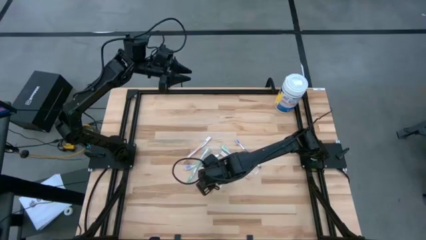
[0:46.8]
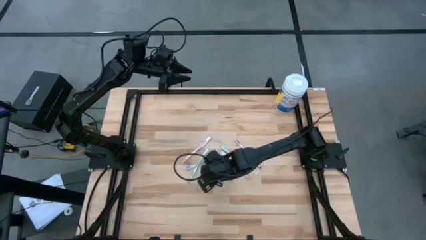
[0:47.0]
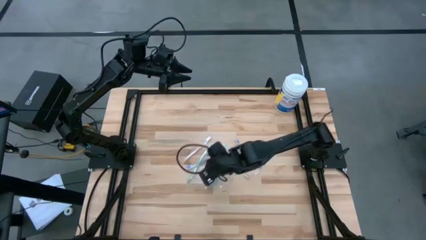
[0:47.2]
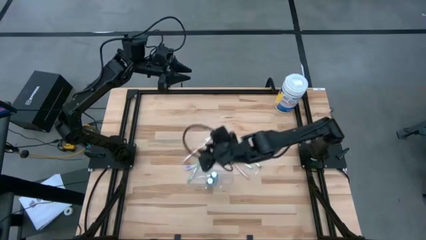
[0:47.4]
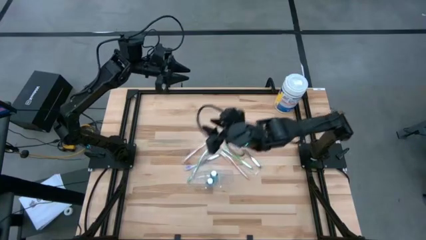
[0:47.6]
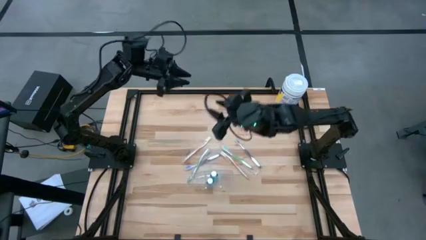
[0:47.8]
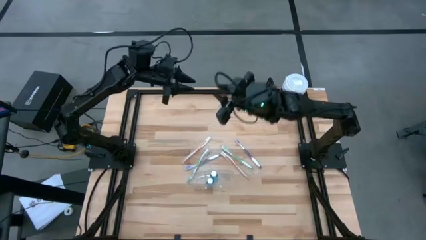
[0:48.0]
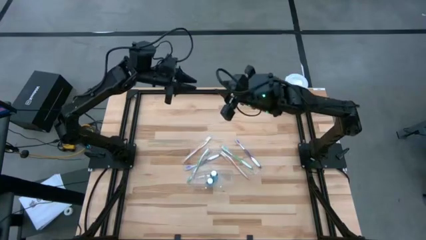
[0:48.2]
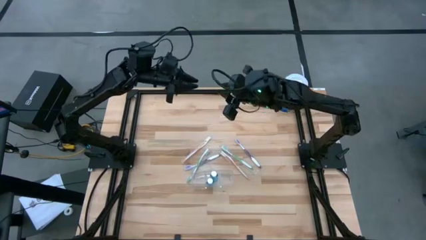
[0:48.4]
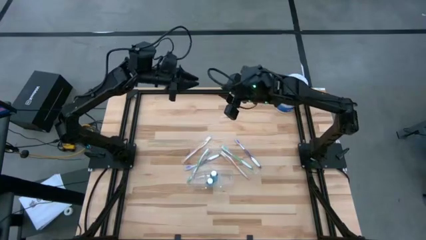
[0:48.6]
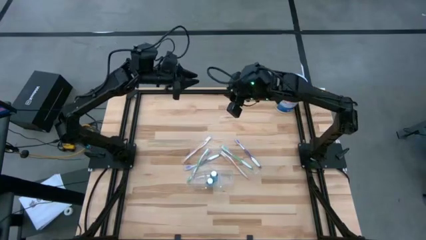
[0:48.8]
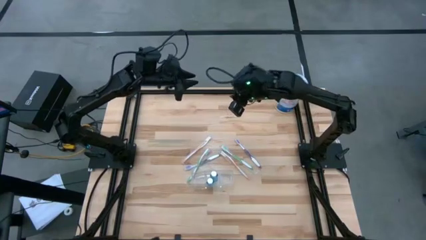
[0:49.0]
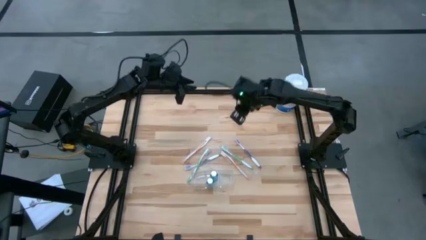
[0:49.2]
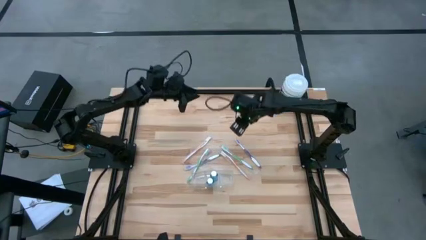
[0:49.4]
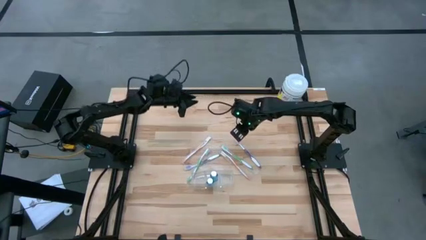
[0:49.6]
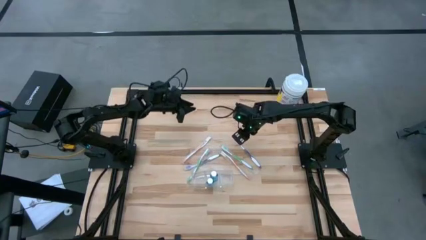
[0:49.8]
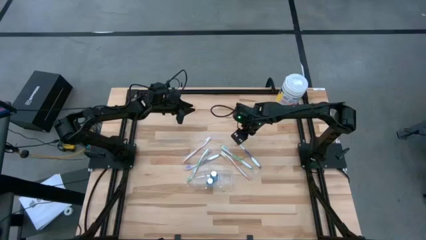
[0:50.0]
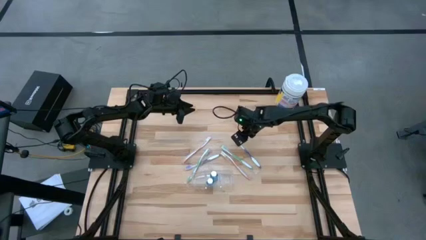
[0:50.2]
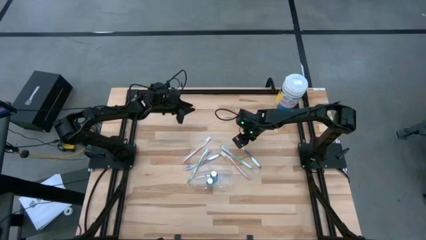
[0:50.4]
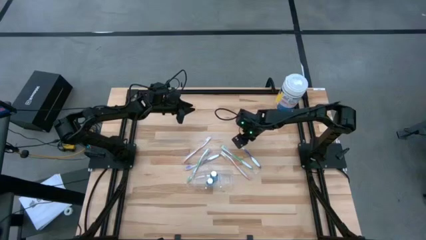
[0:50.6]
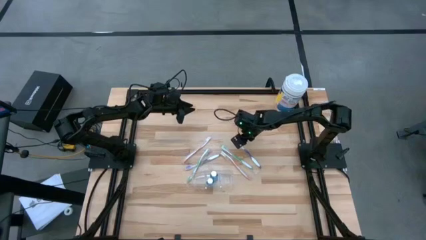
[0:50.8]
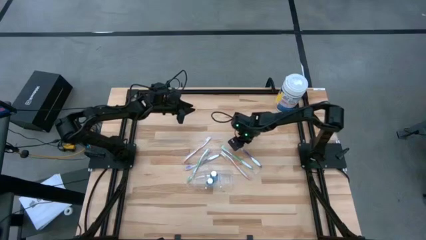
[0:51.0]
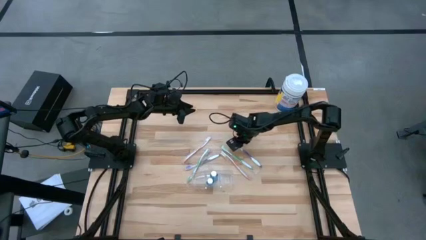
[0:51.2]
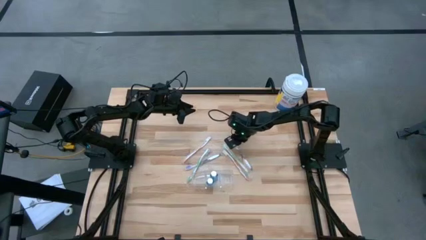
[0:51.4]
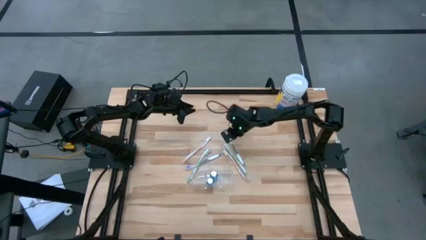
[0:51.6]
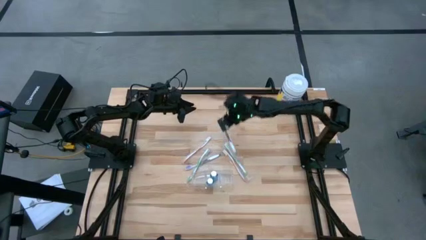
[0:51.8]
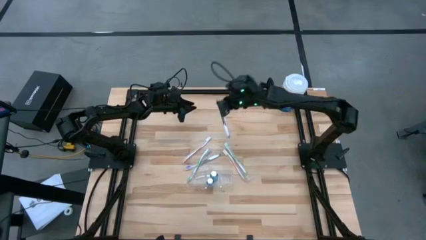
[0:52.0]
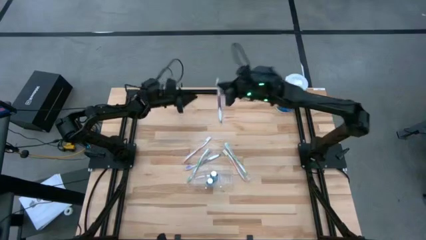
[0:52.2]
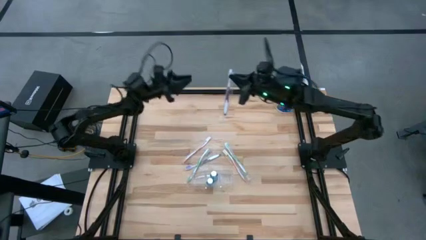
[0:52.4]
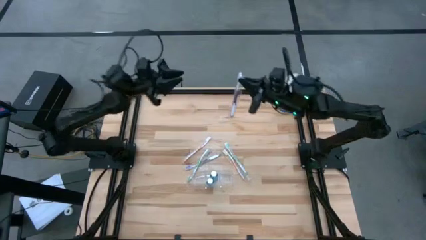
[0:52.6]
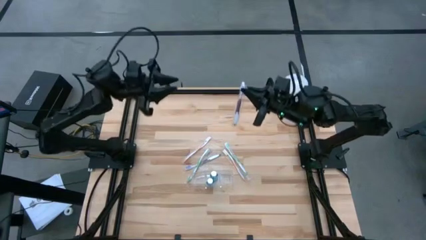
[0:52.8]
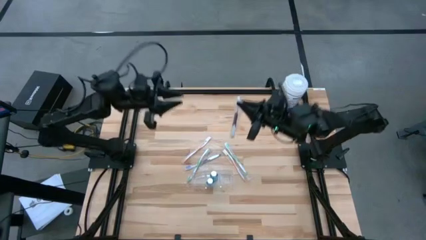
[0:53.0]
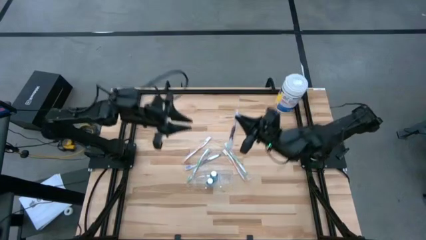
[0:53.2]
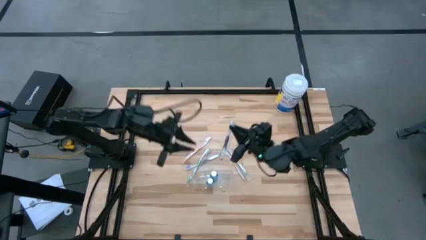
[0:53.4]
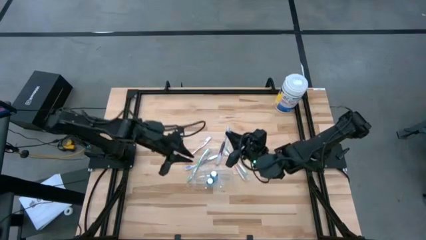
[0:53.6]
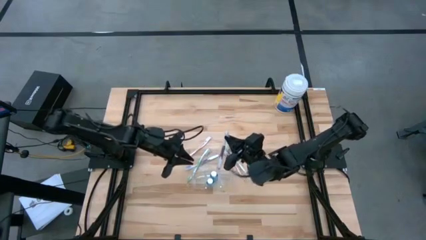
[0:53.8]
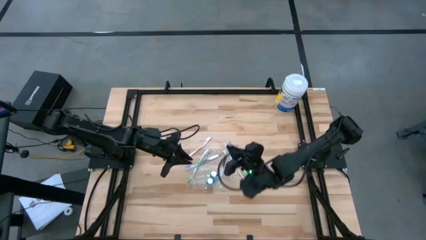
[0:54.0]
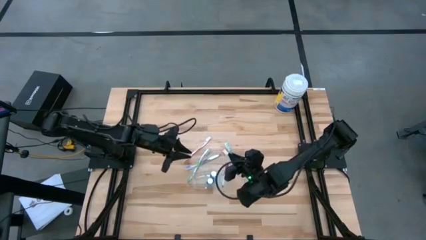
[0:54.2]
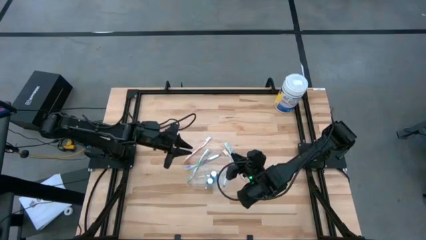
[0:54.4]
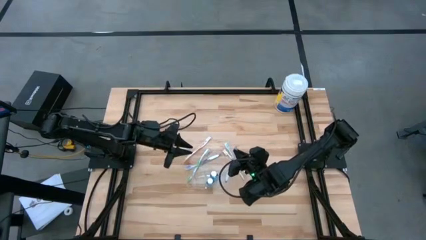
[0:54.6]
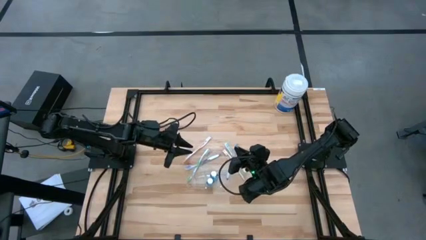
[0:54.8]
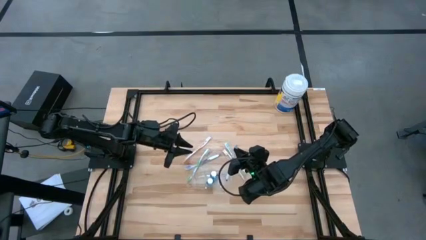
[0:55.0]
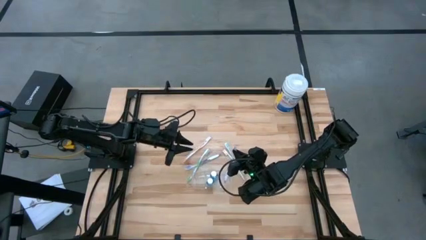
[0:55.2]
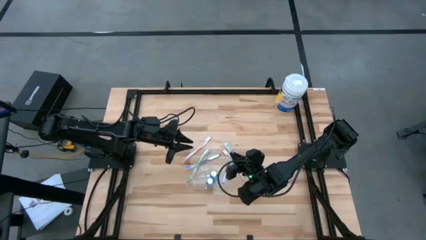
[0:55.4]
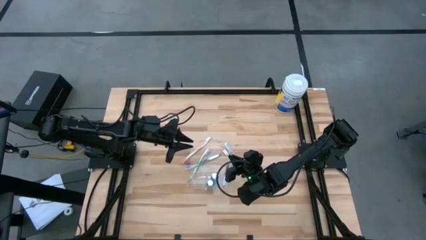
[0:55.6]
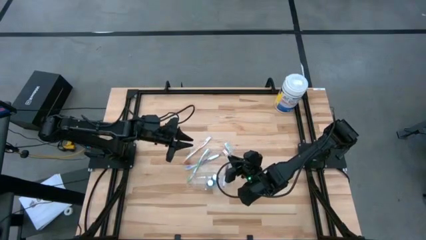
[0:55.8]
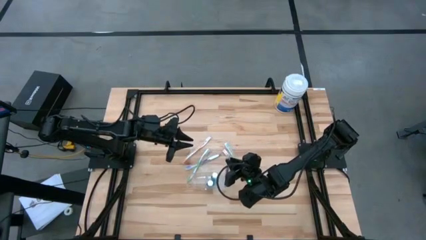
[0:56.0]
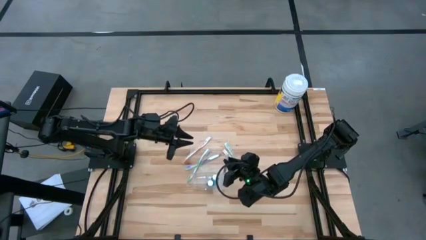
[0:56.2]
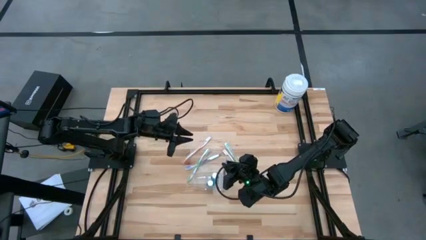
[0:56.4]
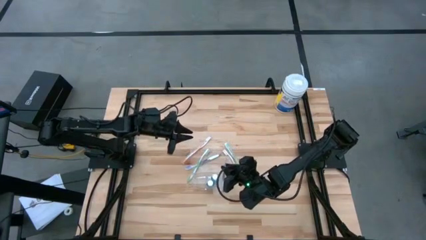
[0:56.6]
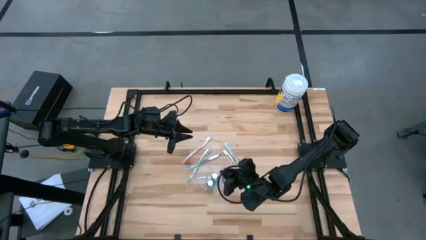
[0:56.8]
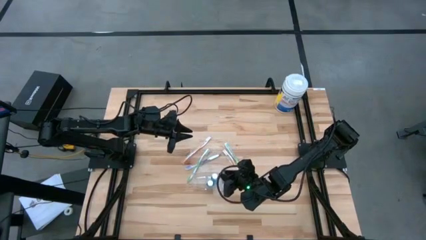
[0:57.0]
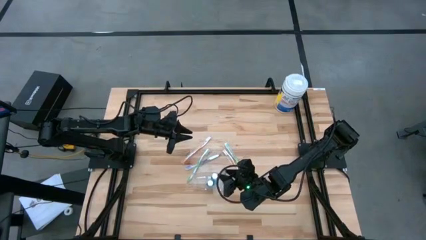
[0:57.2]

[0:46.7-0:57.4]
Task: Pick & Place toothbrushing station
Put the purple toothbrush into the transparent organizer

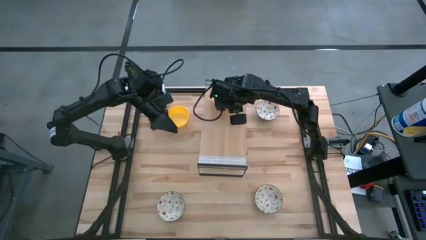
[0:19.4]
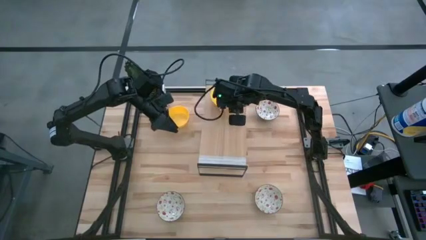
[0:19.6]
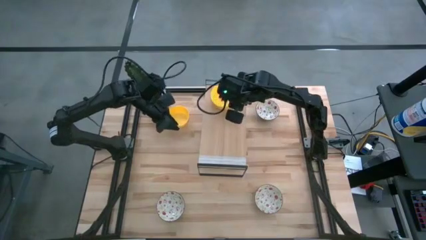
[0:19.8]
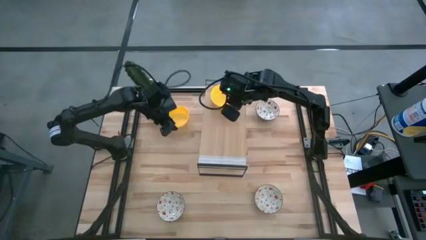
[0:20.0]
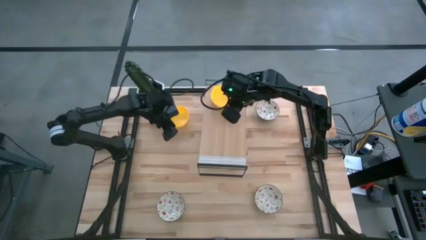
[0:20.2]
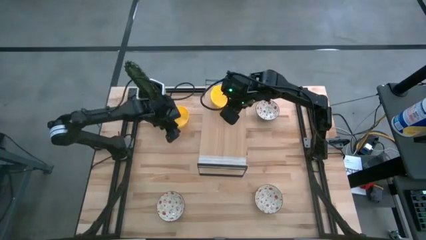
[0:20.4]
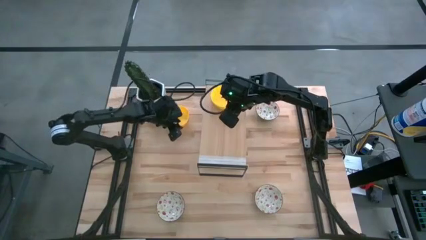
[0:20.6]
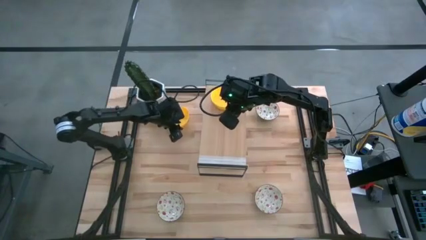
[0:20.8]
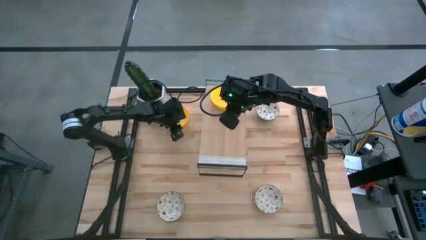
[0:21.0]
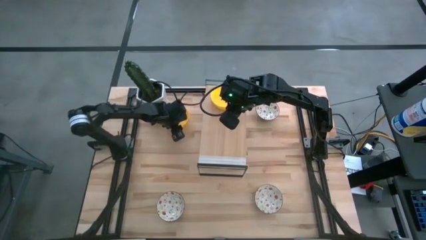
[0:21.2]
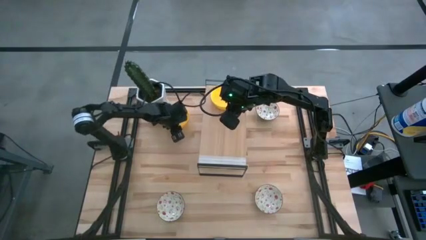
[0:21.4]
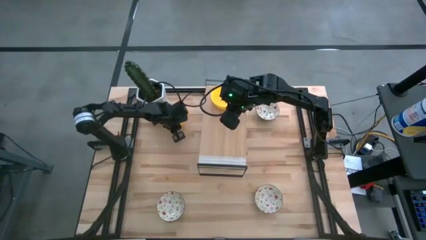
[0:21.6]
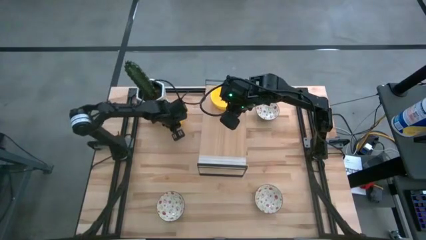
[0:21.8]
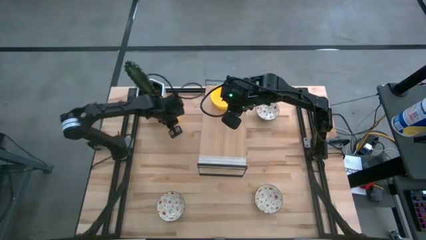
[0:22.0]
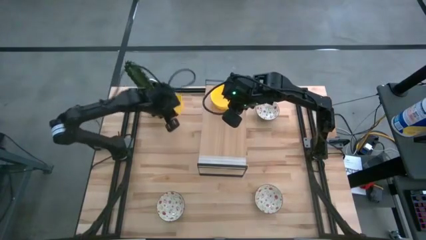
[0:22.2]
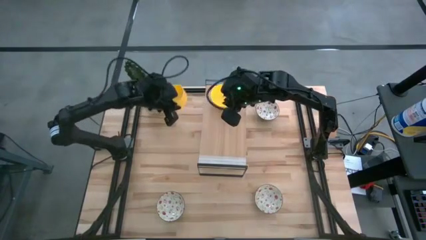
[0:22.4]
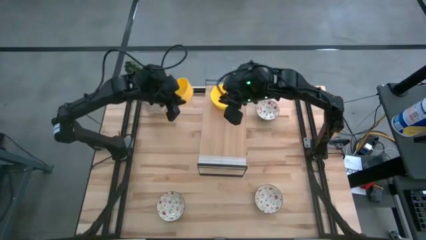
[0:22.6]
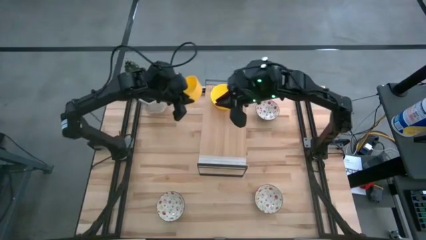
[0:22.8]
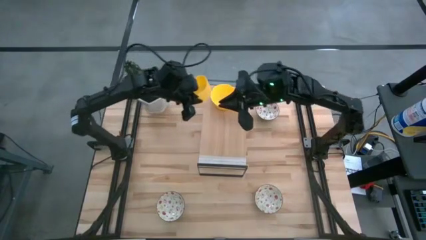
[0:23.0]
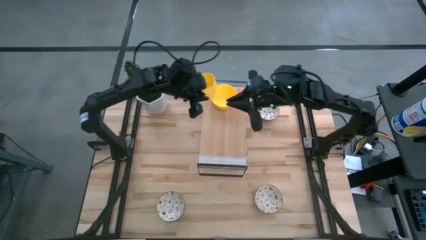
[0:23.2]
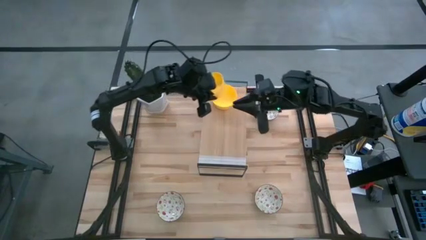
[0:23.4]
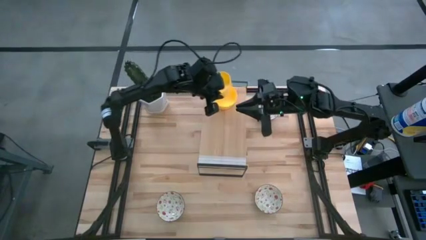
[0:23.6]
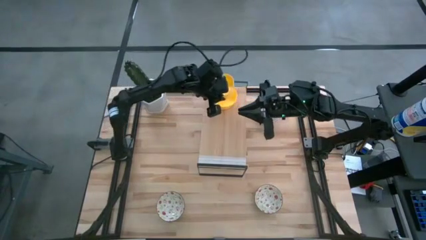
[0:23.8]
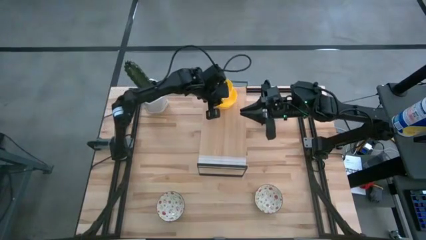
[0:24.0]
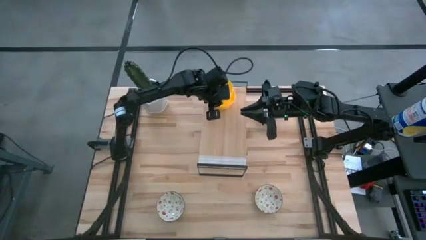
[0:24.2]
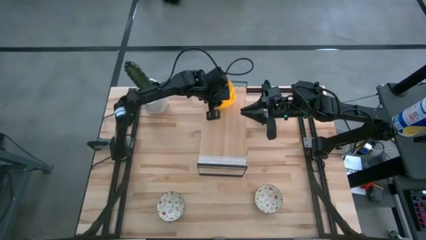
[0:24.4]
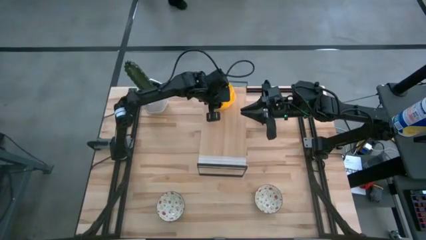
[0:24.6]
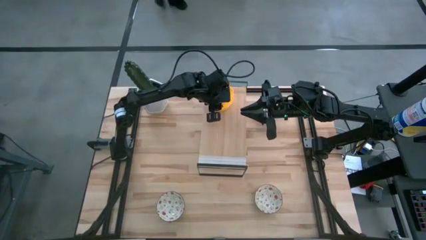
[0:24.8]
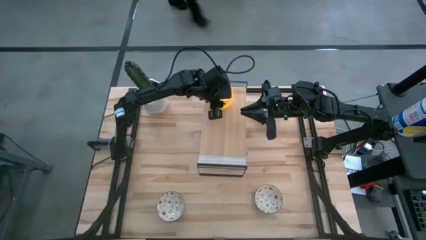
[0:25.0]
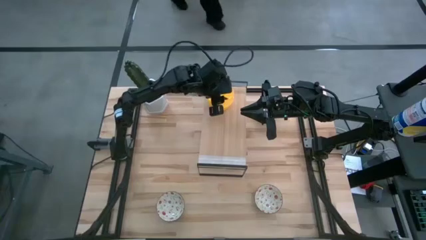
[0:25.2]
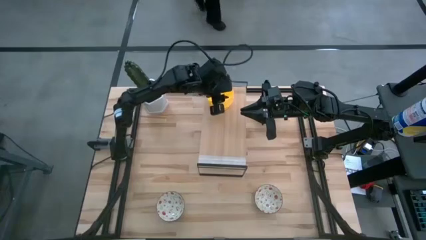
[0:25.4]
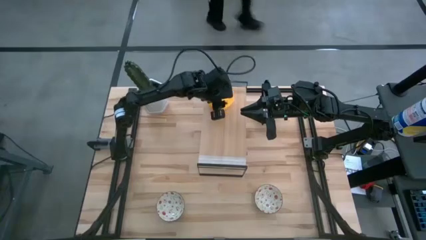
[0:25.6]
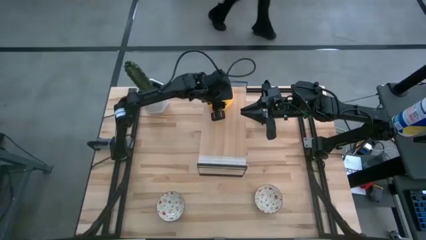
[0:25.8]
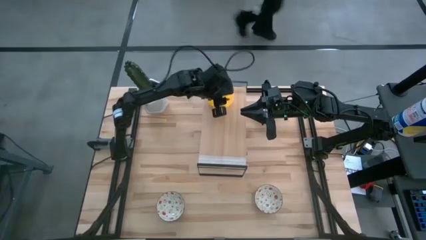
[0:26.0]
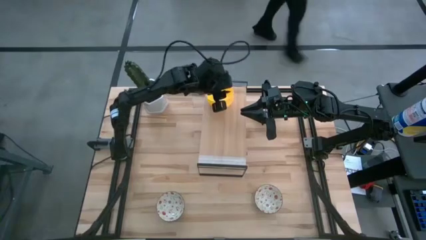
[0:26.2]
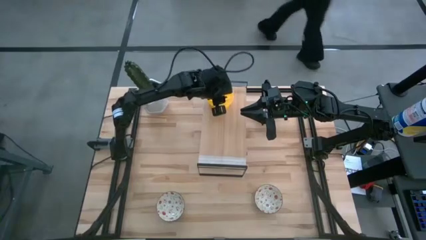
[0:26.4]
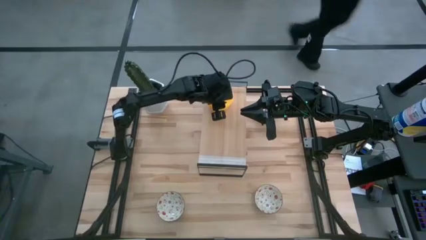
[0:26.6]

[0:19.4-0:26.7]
Task: Pick & Place Mini bowls
Stack the yellow bowl on the yellow bowls on the shelf
